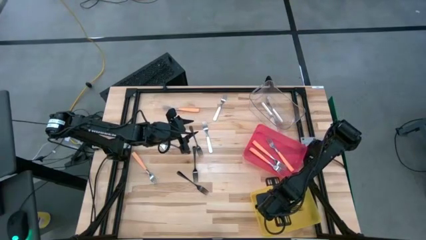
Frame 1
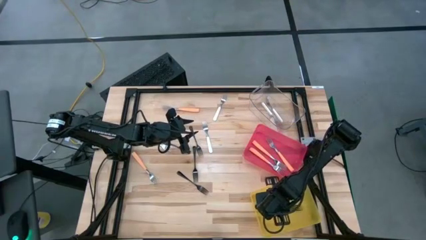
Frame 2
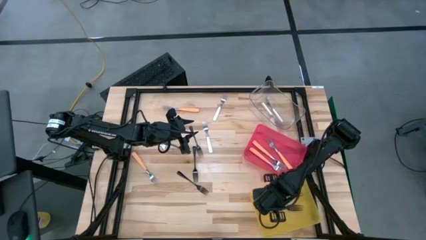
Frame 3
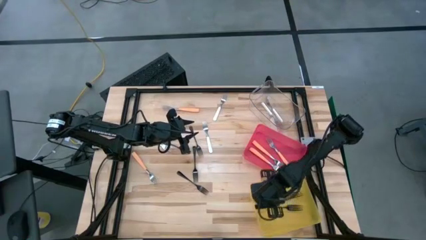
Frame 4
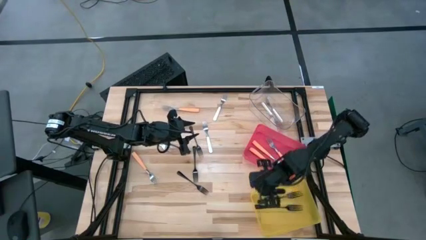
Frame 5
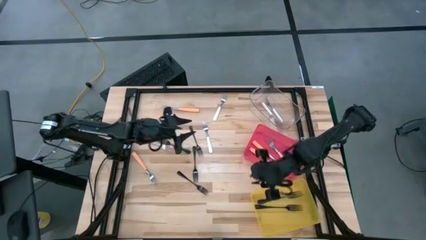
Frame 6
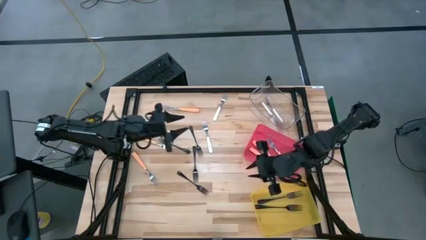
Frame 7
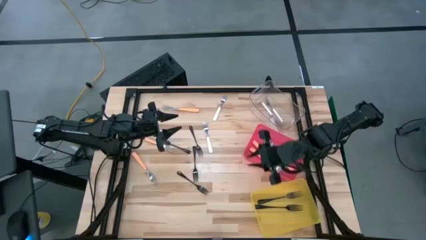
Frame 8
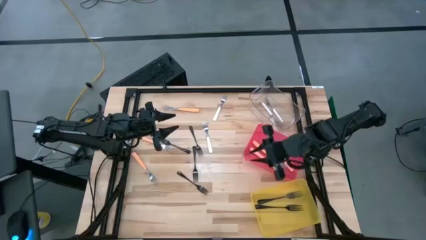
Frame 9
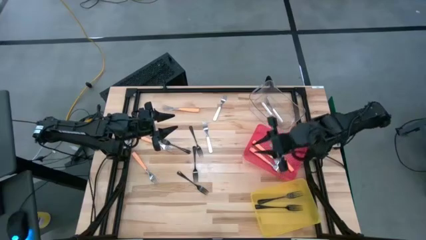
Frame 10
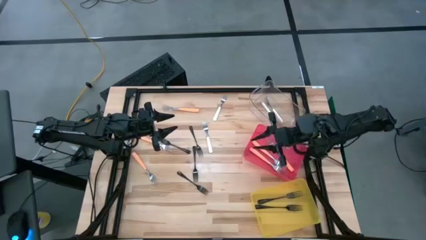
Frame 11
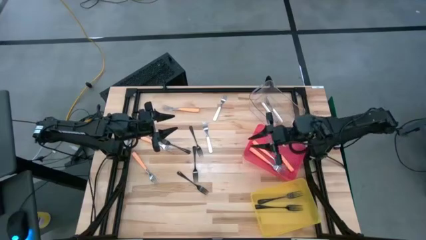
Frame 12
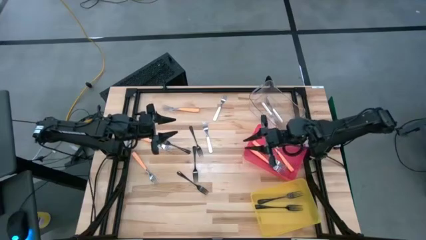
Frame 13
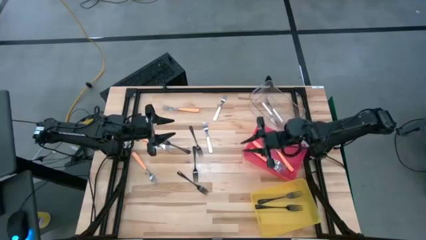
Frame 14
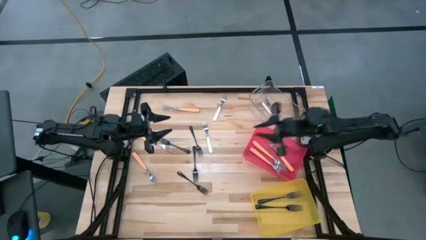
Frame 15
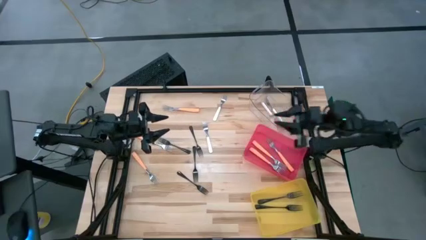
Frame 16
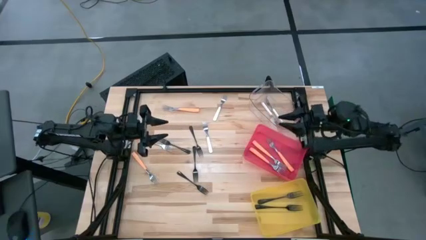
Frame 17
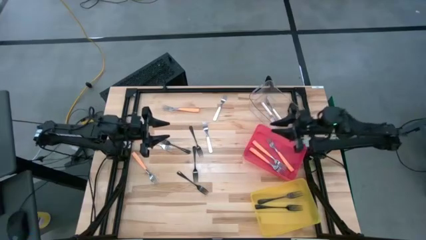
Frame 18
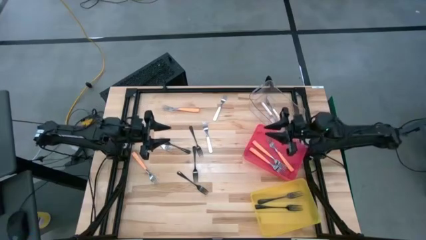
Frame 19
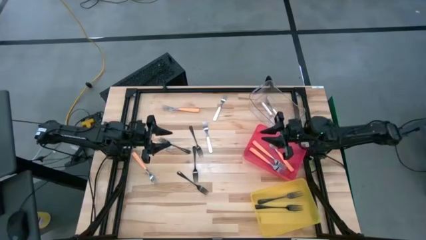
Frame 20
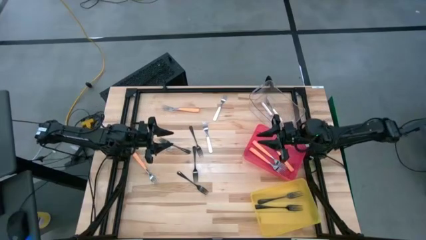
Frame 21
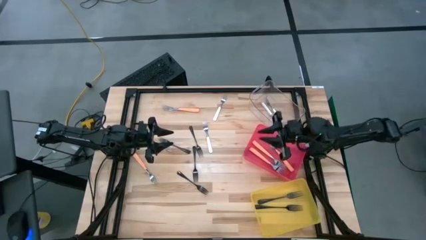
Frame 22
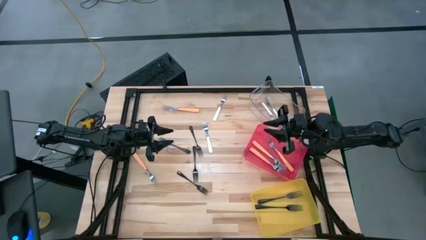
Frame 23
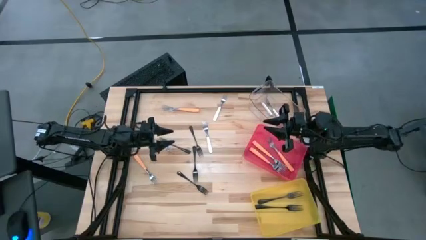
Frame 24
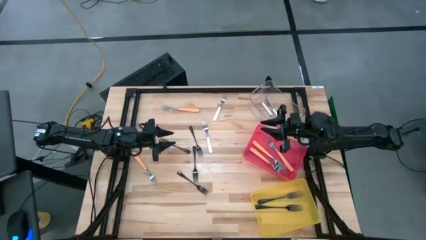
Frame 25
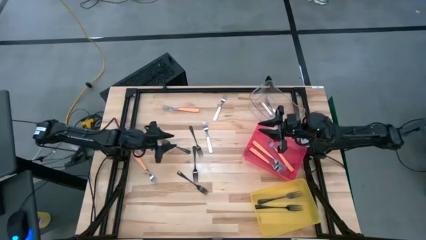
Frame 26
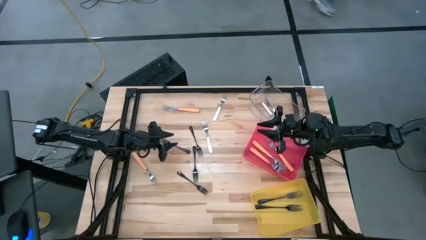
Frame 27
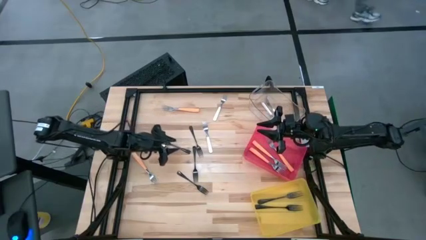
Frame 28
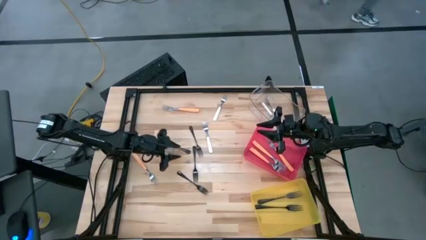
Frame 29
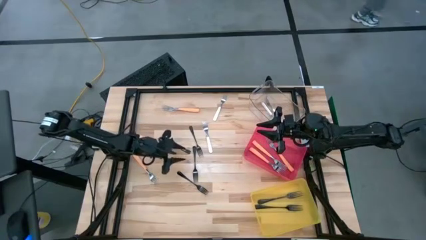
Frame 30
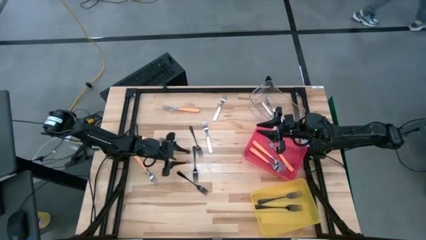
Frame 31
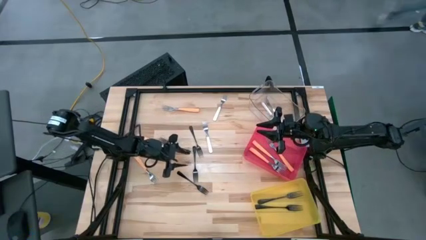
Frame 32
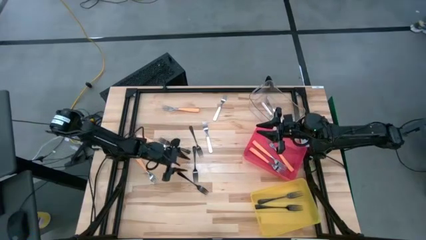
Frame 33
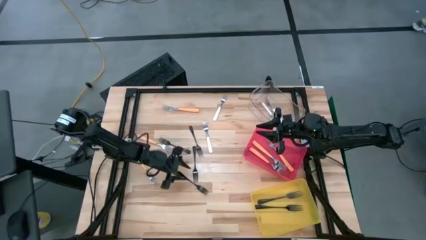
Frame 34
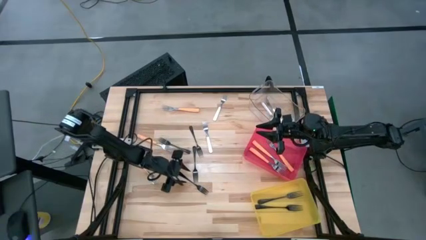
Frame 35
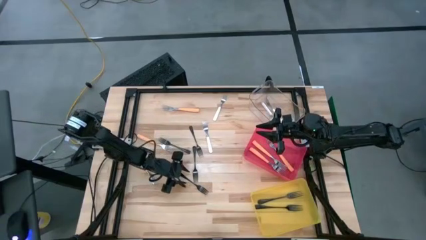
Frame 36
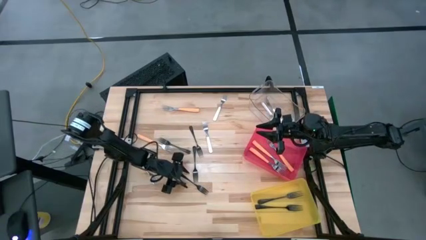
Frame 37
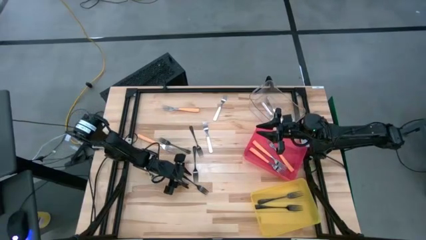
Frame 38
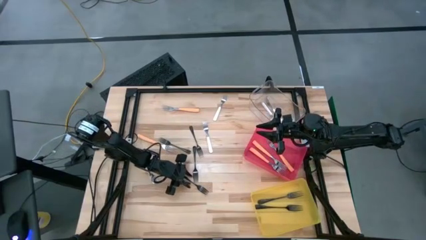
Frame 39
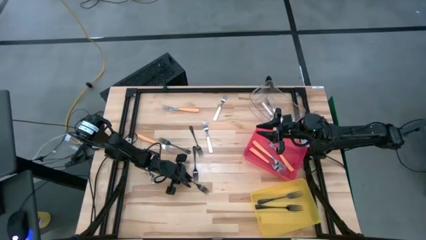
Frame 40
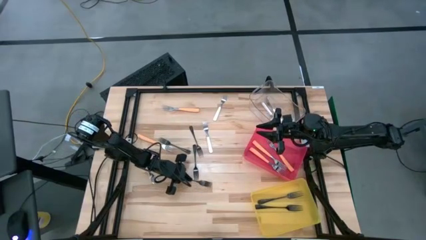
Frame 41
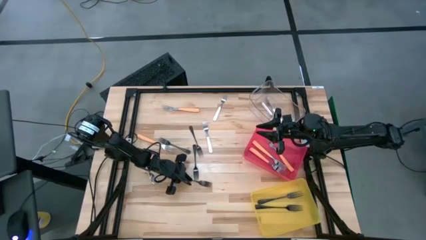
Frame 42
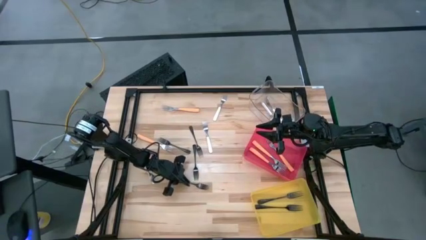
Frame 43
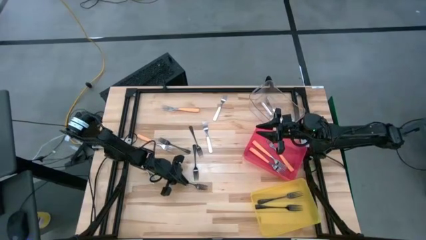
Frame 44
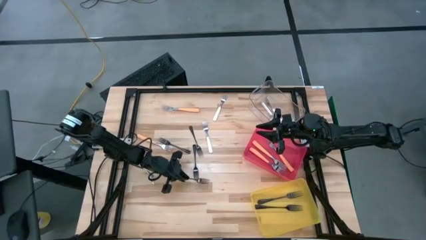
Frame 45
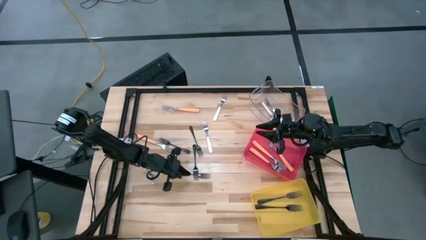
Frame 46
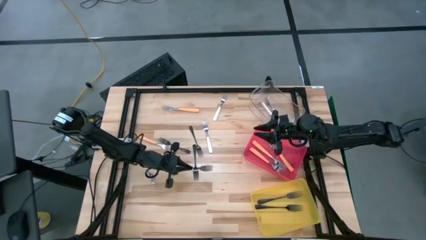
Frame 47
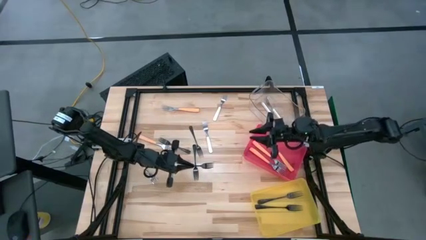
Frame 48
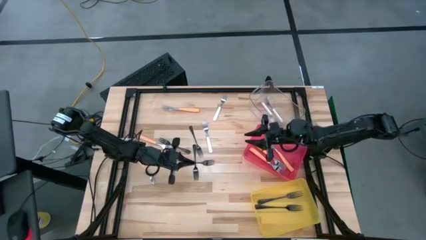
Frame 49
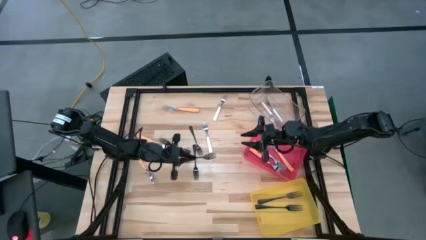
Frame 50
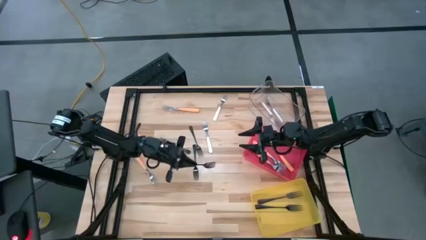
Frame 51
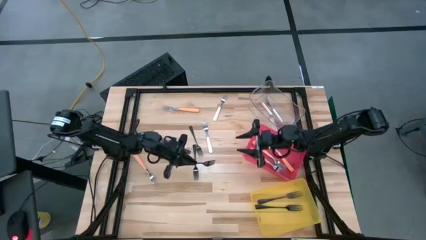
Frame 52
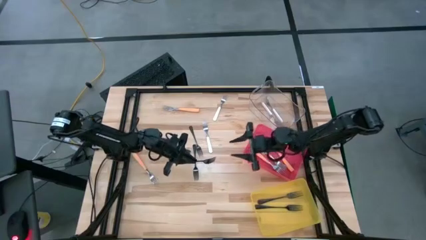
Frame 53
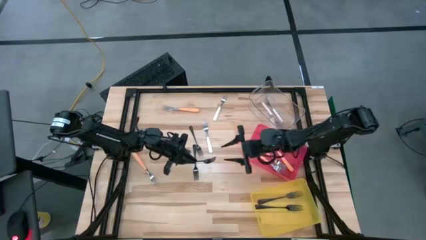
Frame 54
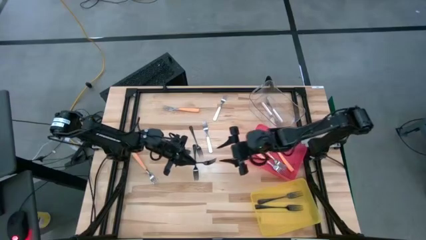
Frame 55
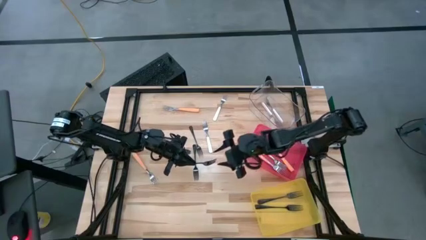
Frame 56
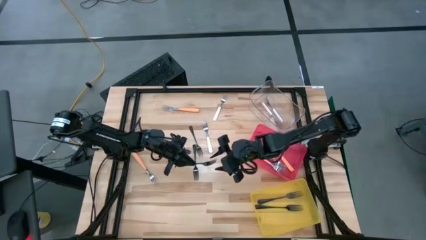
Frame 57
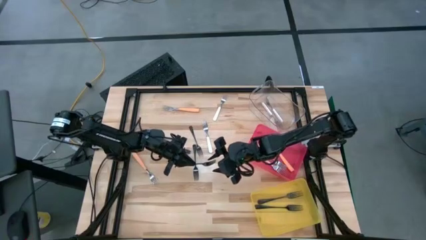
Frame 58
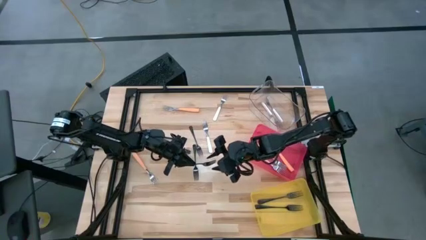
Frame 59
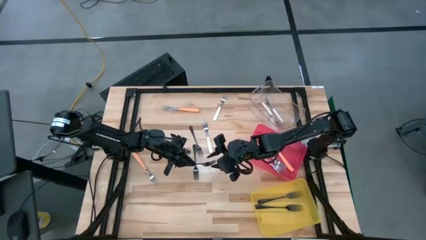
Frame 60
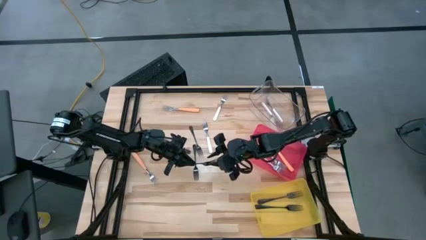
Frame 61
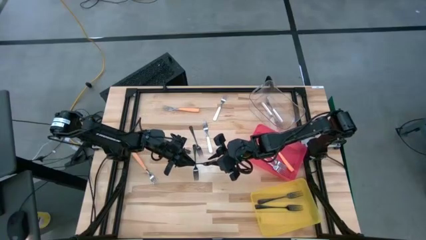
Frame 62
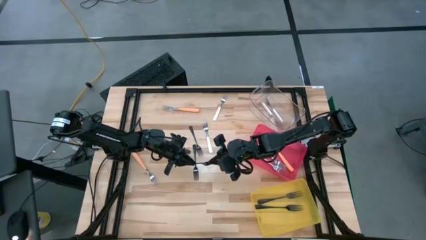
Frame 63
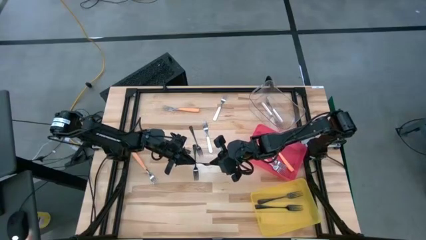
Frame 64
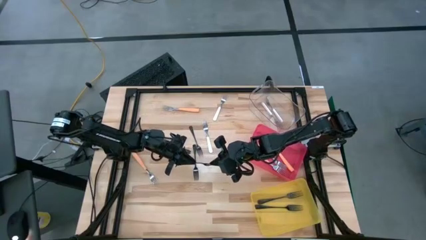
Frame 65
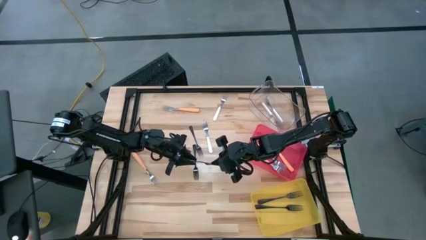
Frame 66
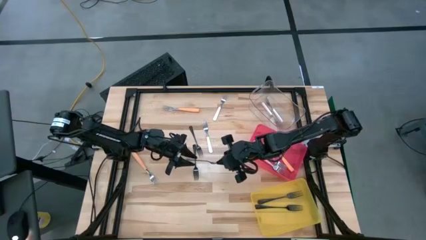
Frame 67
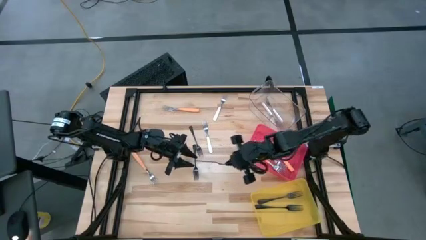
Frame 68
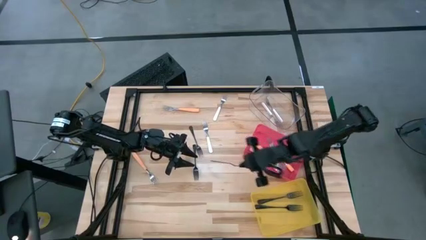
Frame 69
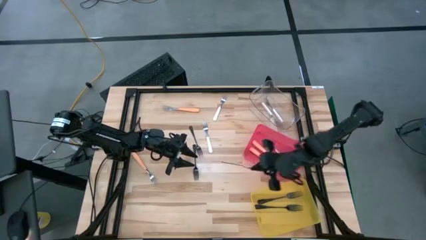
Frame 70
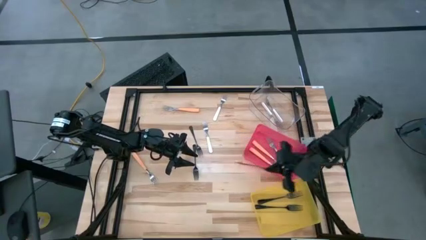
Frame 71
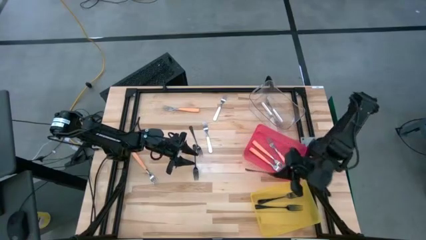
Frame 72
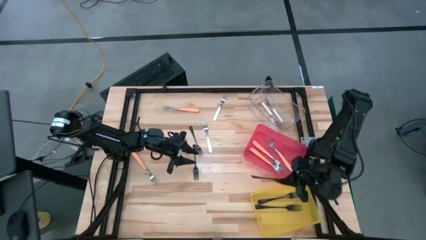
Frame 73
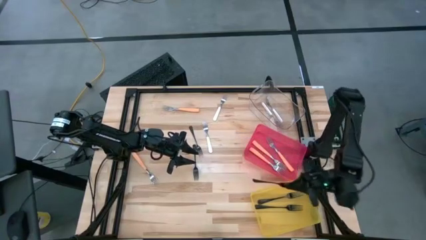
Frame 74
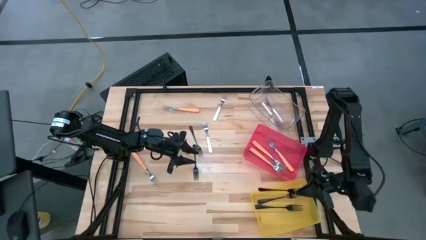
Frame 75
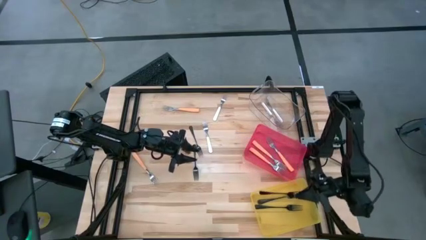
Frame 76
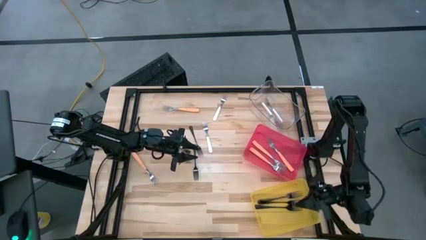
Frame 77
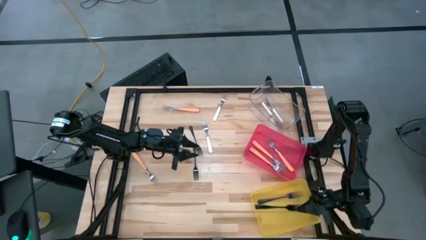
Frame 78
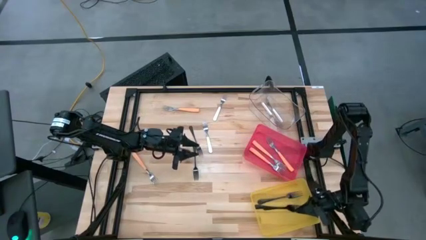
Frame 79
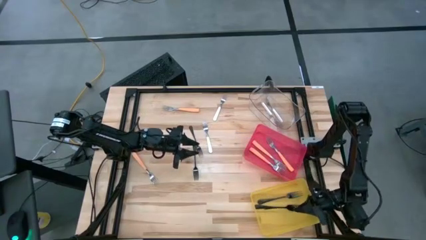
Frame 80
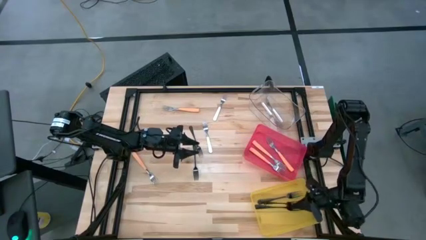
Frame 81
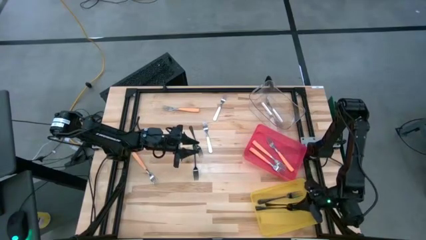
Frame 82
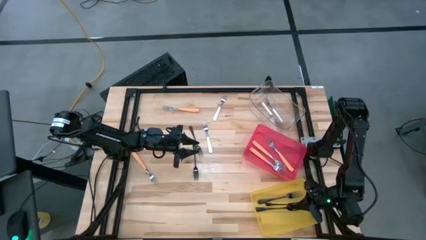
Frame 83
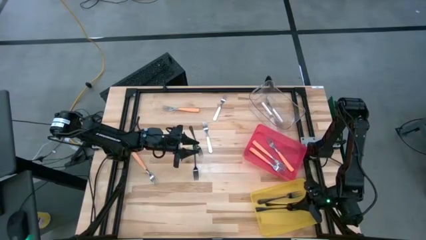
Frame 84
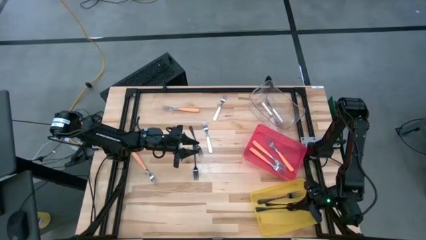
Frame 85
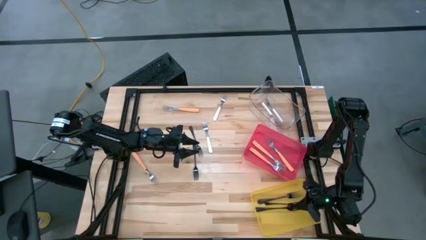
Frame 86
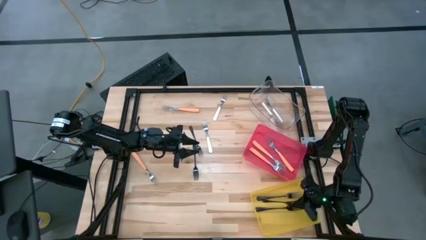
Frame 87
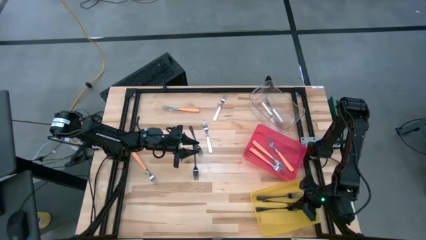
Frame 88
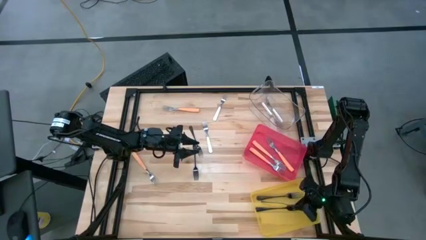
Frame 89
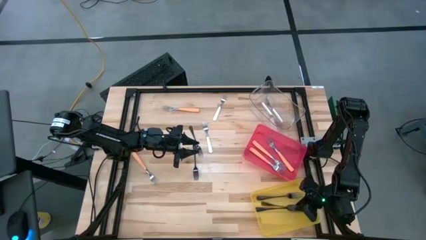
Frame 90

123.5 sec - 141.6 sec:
Task: Sort silverware by color (type)
Put the black fork into the yellow bin
